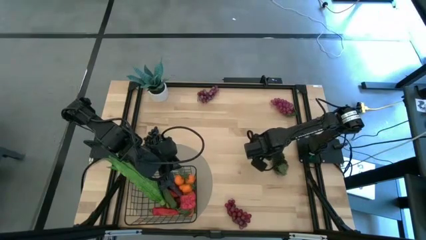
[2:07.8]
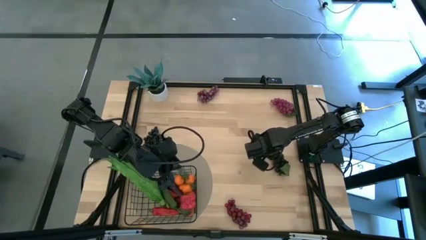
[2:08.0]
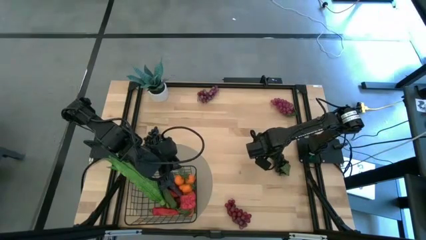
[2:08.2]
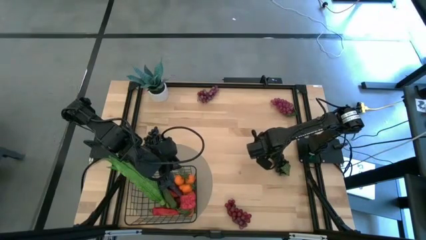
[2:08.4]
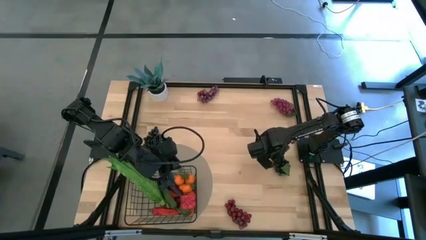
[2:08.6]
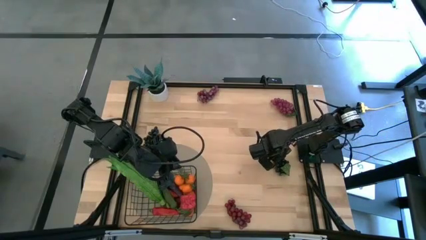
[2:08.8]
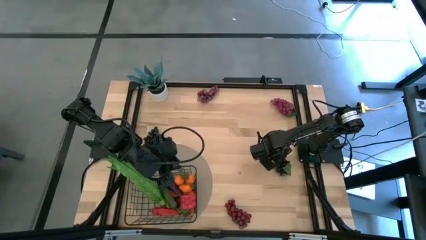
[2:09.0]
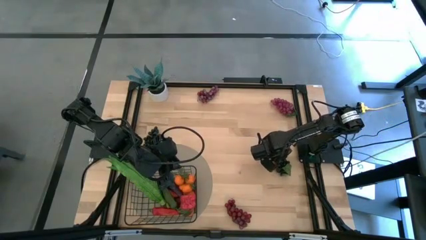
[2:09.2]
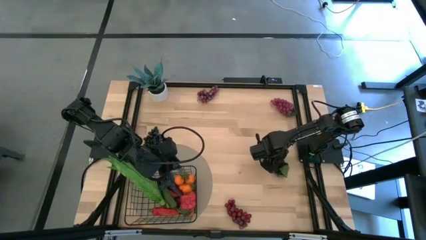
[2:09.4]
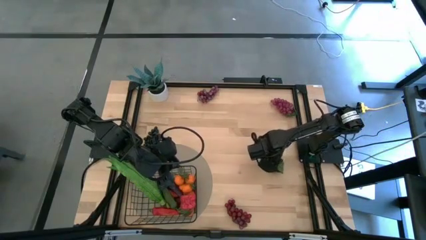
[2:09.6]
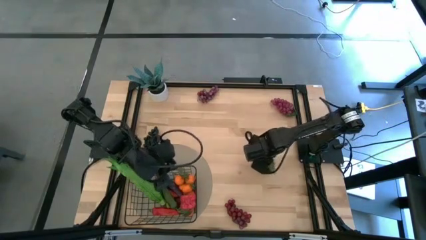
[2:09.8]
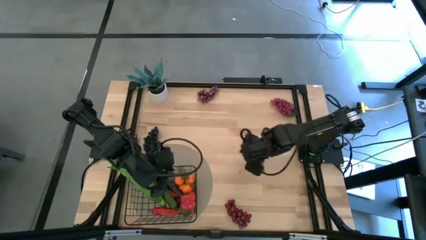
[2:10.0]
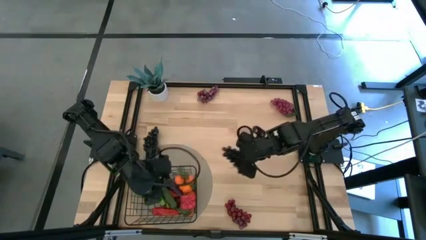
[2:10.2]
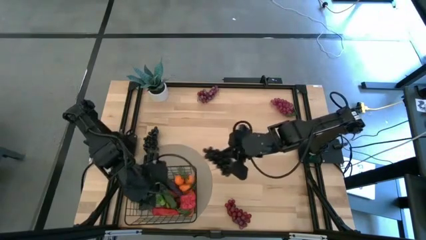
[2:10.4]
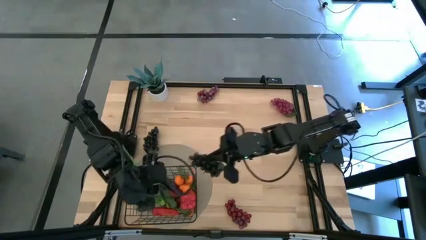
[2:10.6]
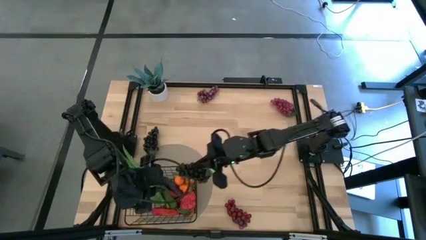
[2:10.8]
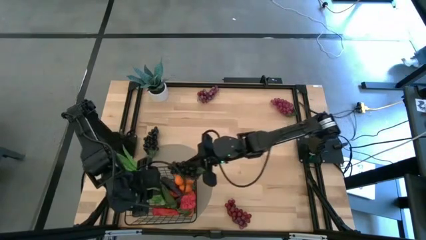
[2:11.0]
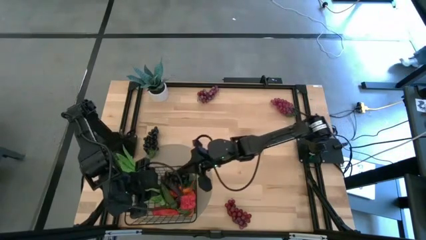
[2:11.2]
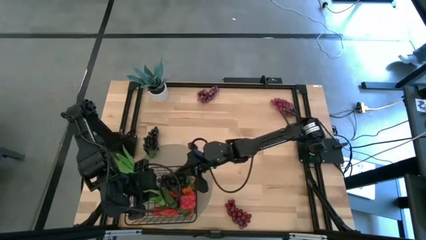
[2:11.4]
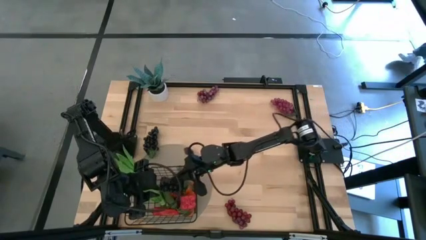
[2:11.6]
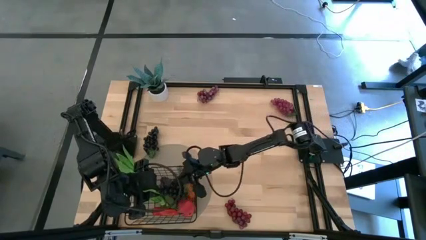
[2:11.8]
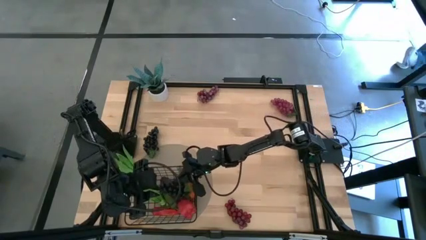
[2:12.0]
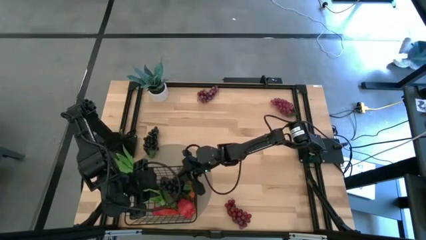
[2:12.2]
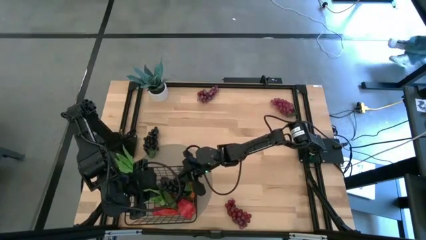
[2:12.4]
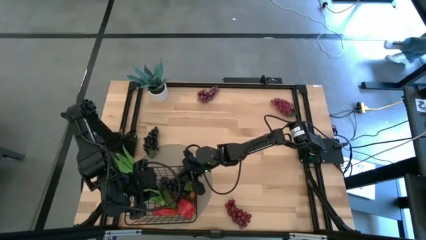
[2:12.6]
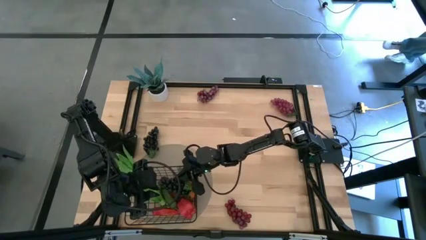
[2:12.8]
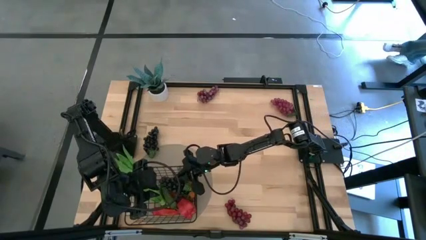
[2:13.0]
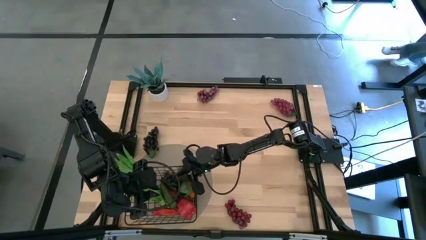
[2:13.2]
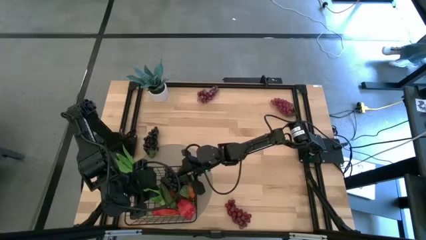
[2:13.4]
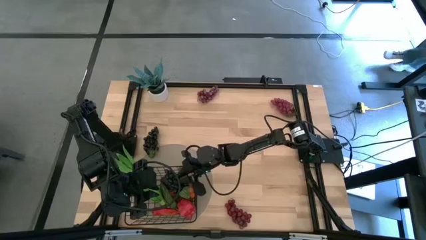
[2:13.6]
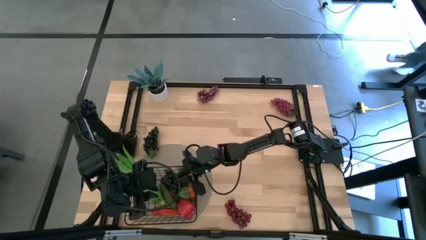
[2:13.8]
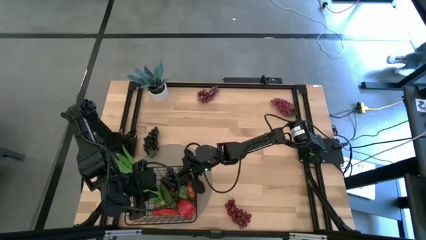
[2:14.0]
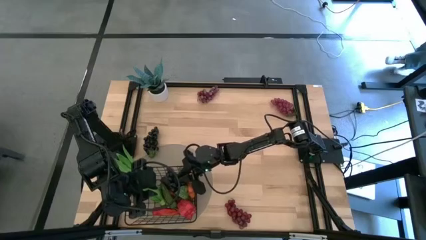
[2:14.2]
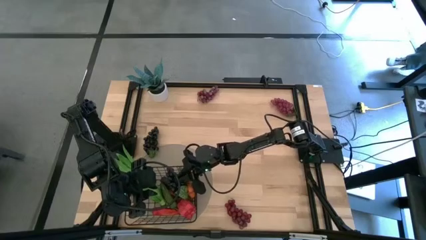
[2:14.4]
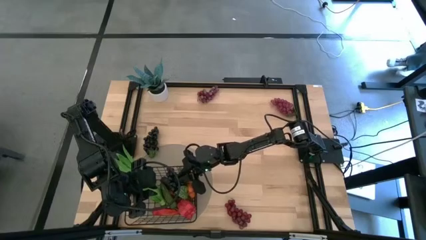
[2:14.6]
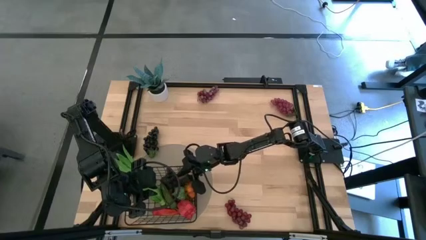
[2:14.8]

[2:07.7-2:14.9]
Task: Build produce basket
Put the right black grapes into the wire basket

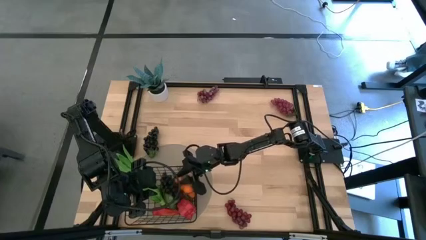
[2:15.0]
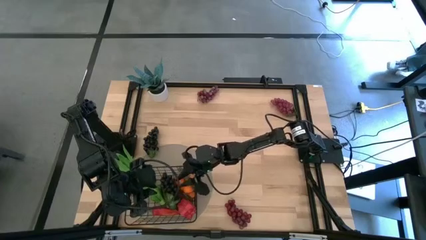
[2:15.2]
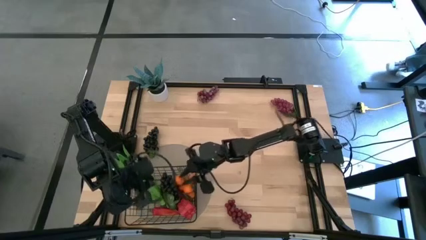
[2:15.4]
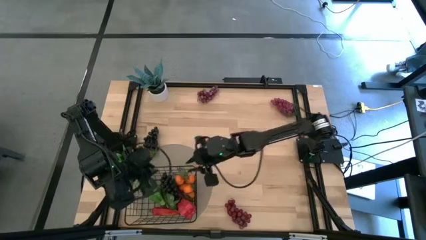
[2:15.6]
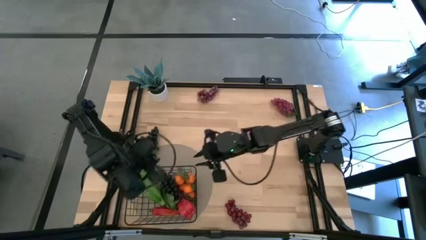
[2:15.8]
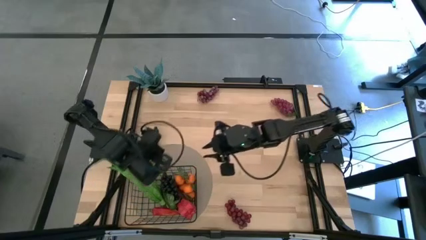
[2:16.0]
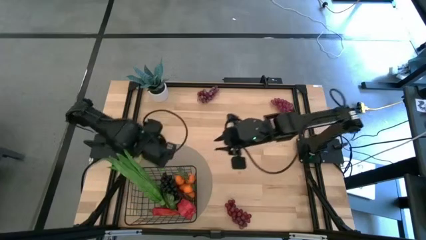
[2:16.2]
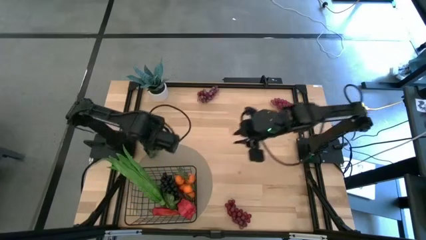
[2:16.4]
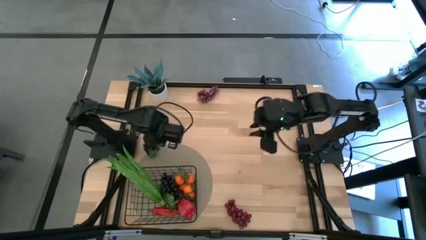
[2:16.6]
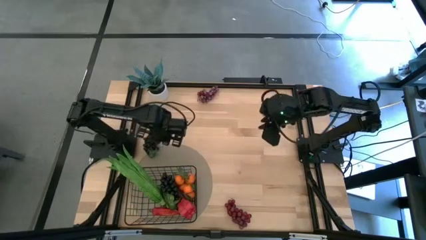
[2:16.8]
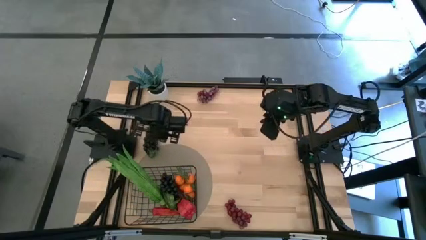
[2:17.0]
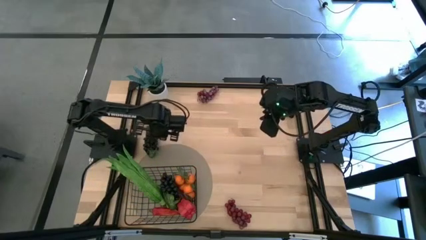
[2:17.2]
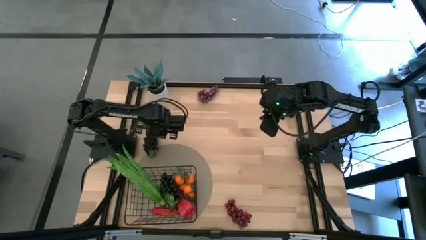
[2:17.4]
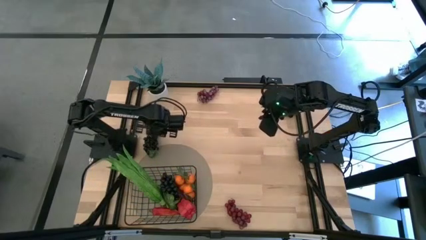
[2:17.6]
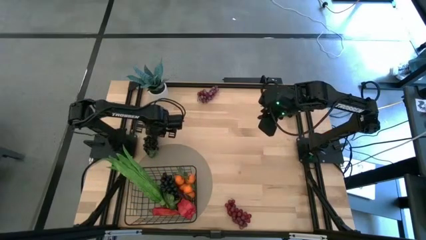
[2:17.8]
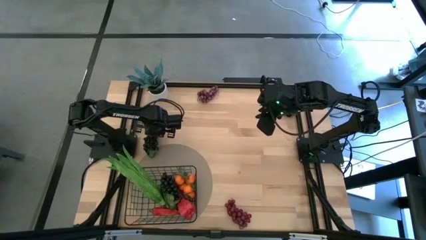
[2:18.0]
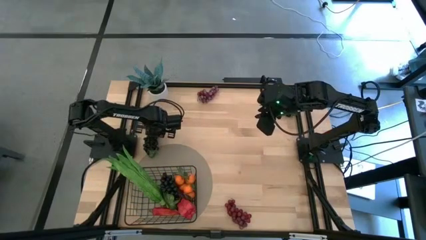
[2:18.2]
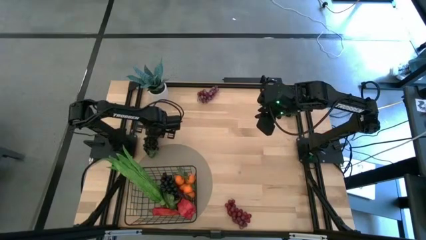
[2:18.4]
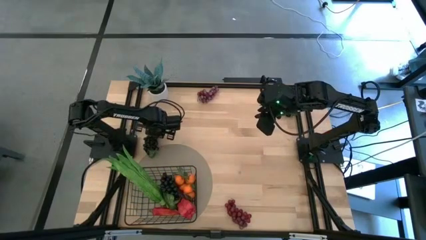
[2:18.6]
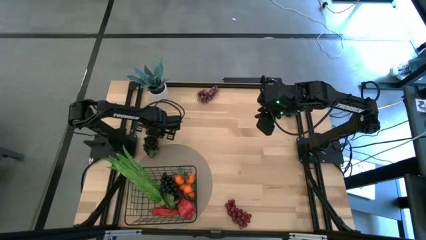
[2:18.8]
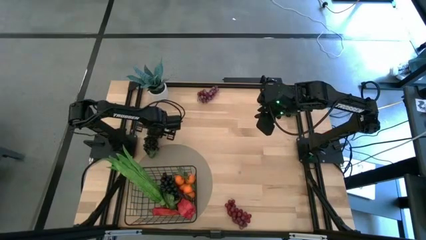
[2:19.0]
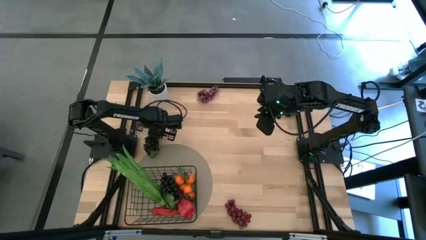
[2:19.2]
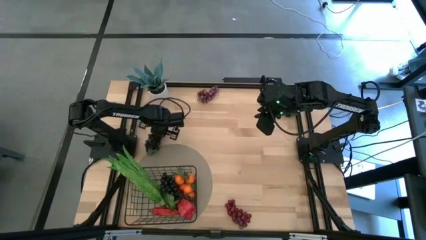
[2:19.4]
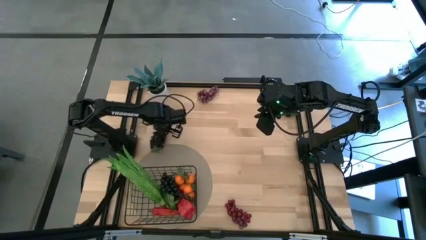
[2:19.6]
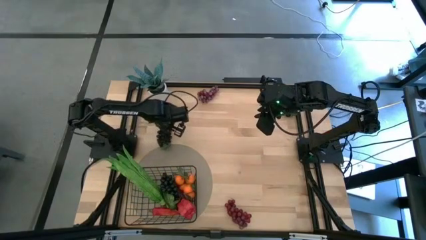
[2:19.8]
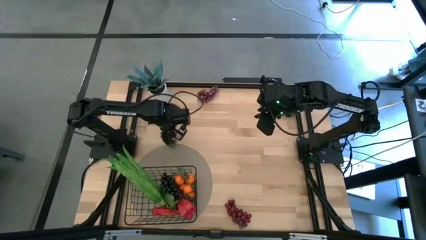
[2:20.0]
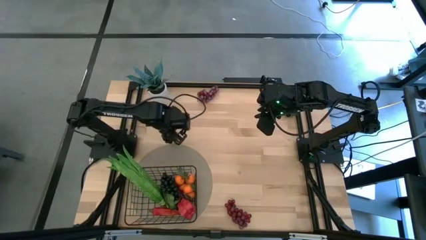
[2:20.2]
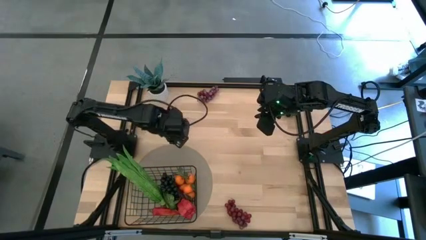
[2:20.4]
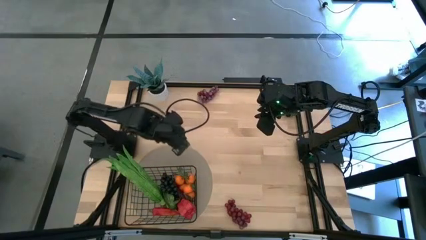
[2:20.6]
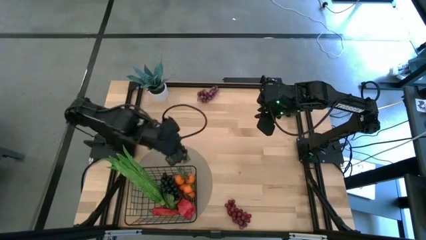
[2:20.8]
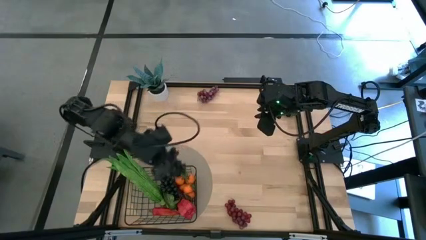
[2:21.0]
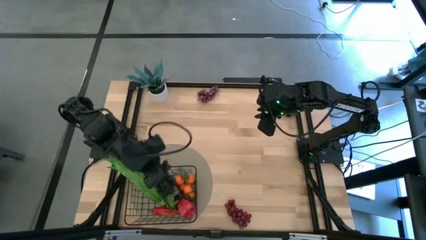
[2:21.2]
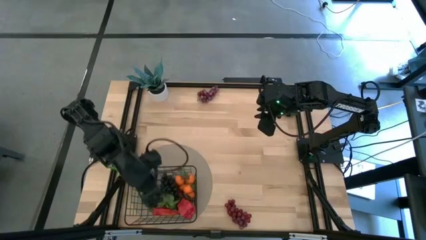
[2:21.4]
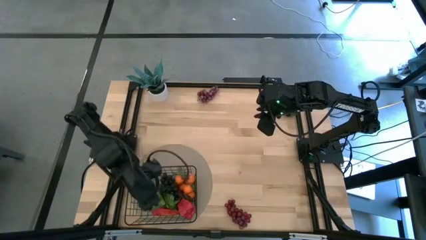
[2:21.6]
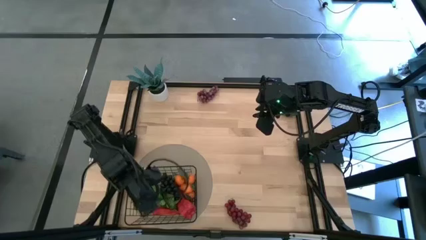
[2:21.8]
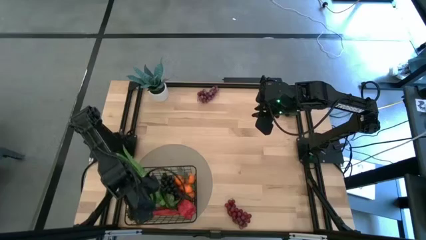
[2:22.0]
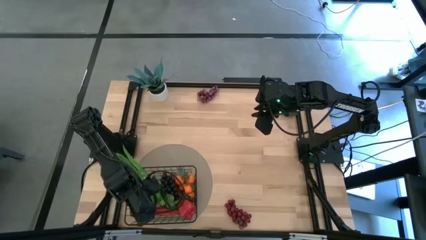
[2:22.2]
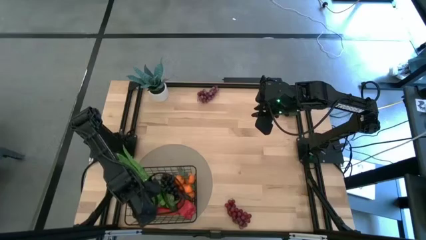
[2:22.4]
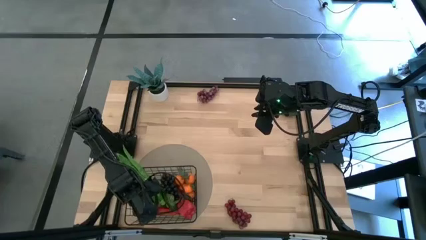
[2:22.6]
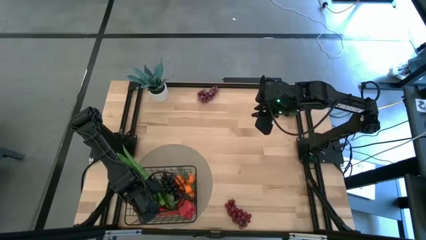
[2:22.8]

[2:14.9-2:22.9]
Put the black grapes into the wire basket
